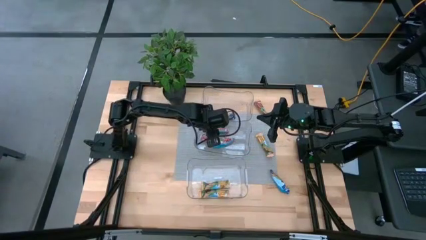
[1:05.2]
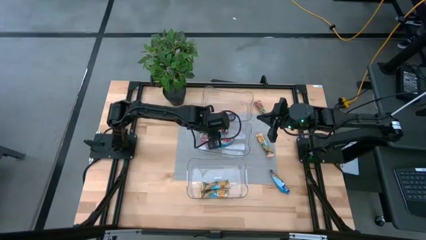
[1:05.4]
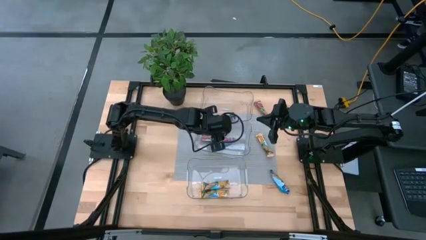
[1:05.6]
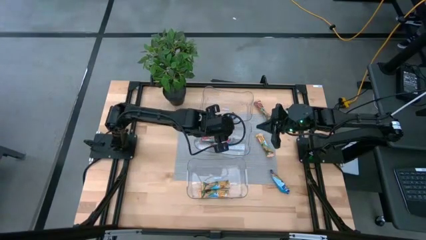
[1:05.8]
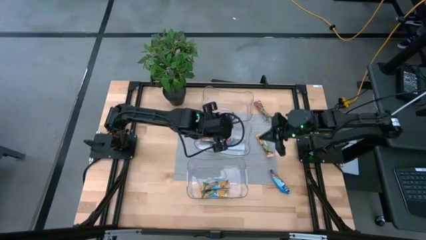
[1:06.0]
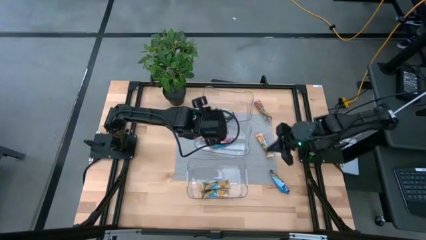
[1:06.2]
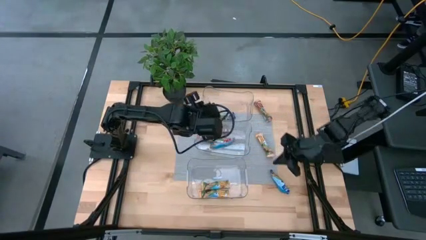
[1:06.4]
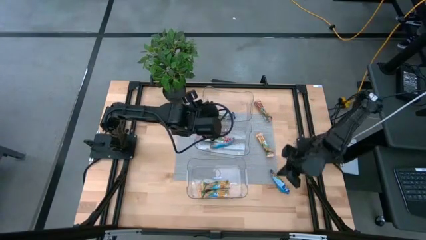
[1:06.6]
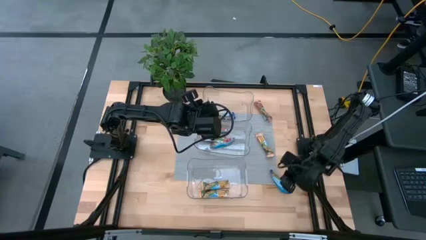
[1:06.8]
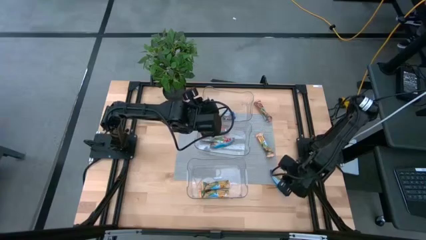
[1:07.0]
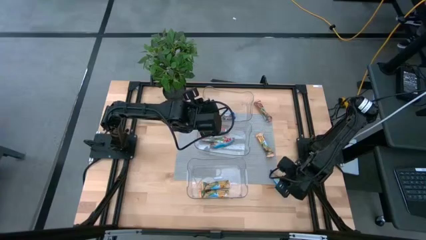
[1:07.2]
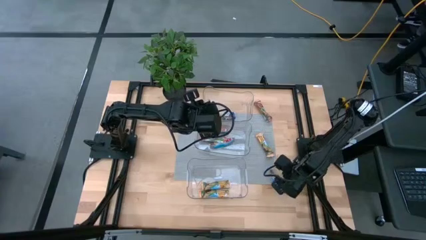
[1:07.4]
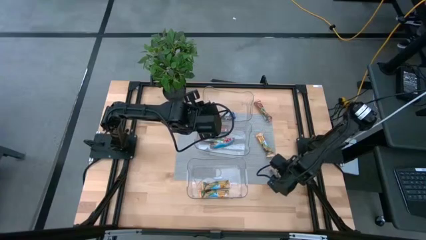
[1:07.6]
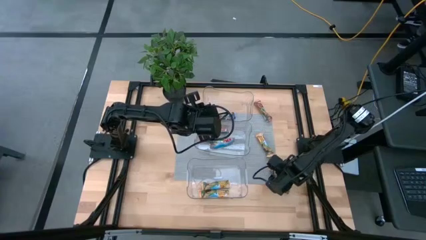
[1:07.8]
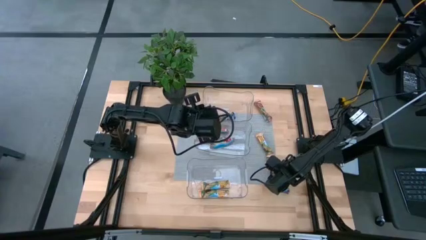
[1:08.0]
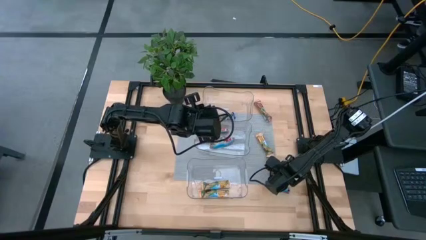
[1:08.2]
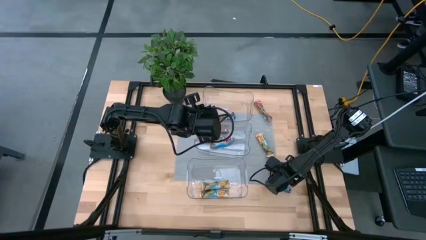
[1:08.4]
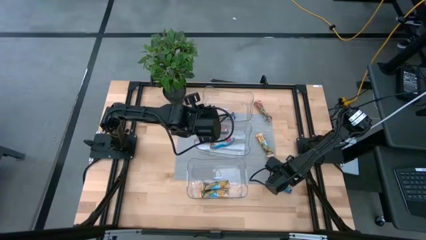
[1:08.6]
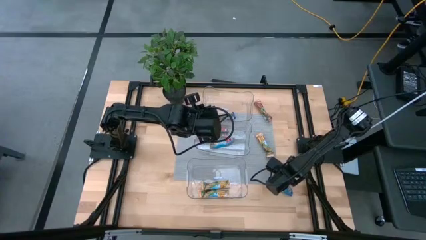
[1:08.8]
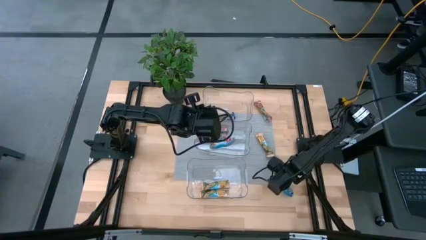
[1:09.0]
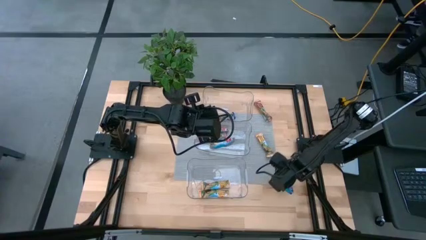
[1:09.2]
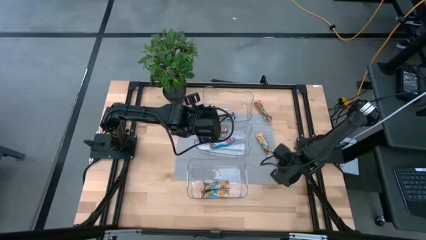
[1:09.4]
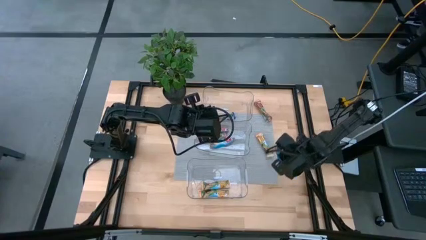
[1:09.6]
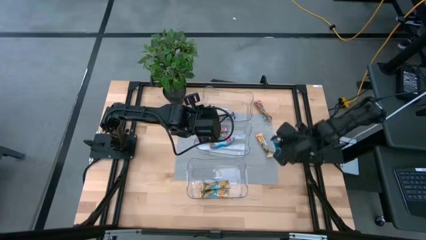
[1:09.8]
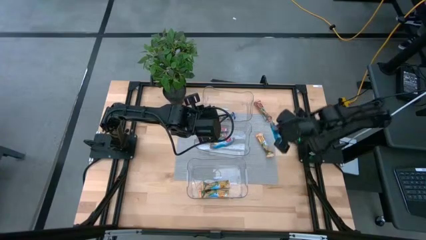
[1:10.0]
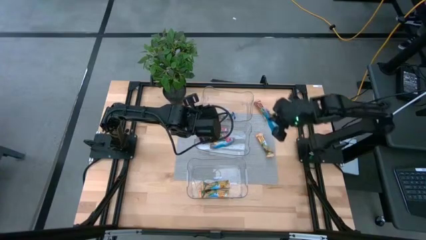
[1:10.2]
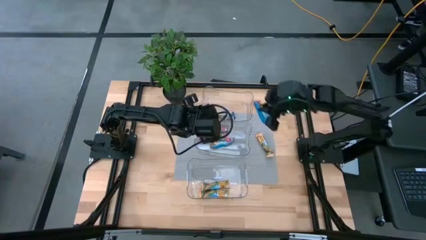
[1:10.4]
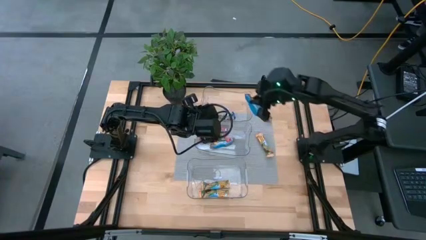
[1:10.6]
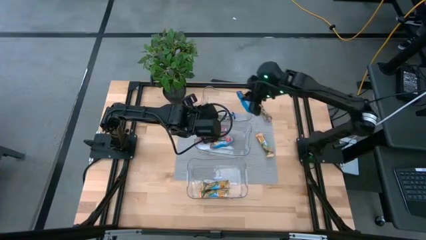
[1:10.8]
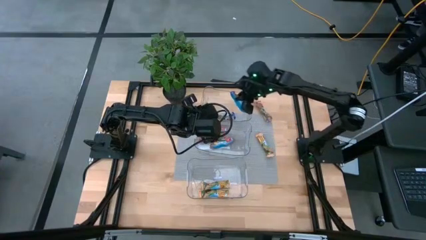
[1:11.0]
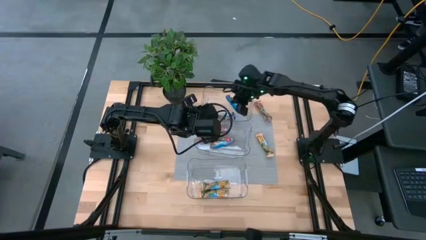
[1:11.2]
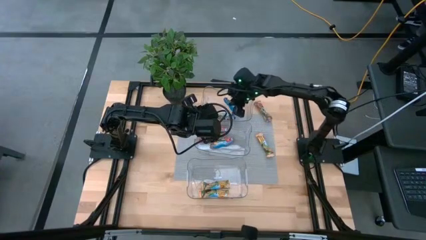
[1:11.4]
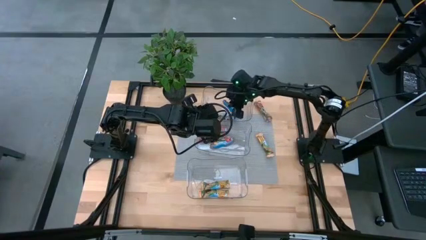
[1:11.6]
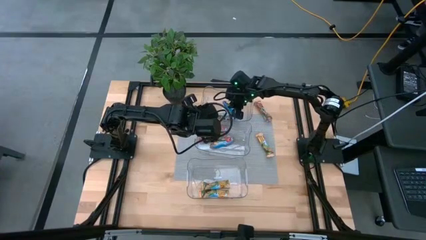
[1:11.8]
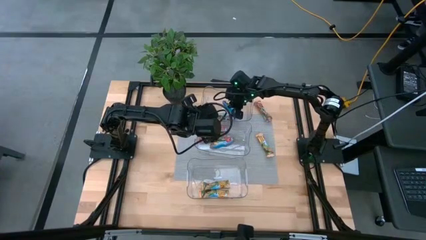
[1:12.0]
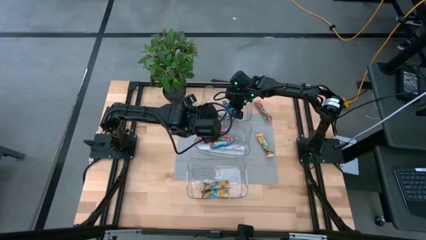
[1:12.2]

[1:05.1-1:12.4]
Task: Pick and place Granola Bars by type
Put the blue granola bar into the top transparent bin

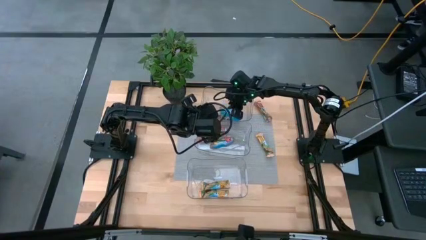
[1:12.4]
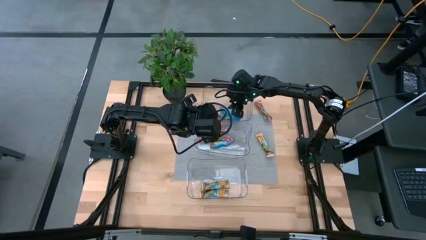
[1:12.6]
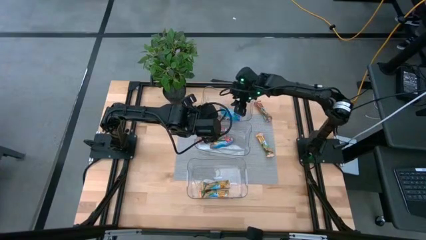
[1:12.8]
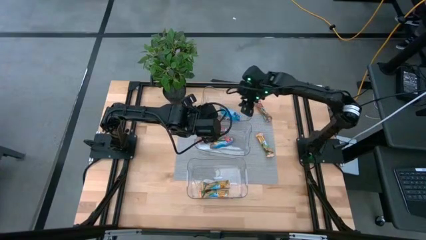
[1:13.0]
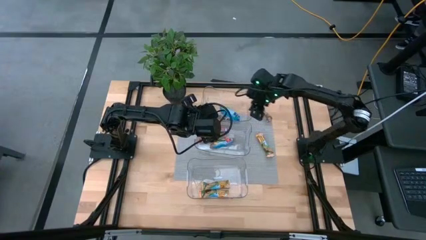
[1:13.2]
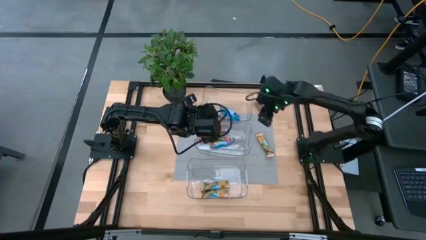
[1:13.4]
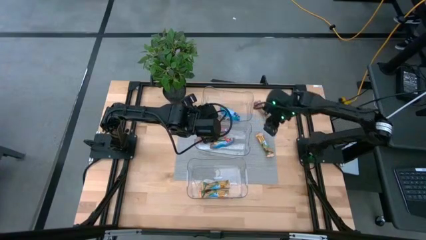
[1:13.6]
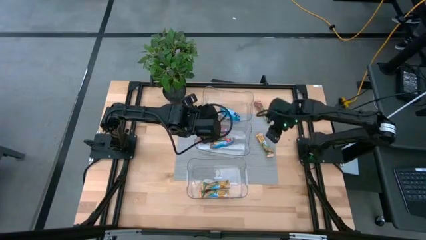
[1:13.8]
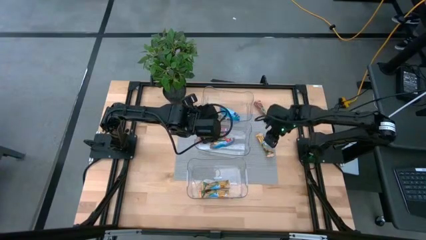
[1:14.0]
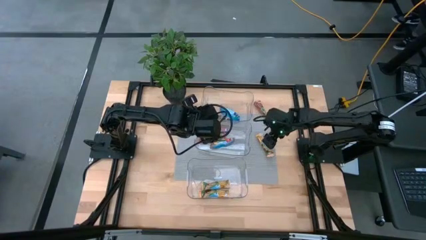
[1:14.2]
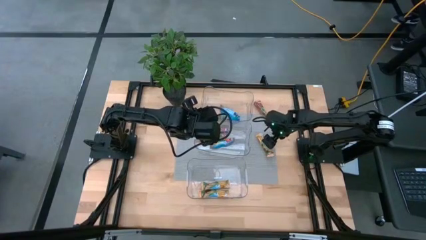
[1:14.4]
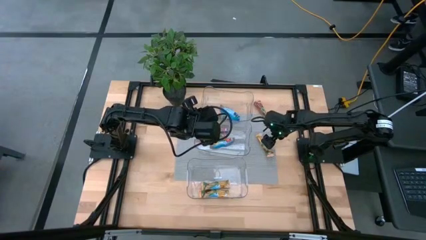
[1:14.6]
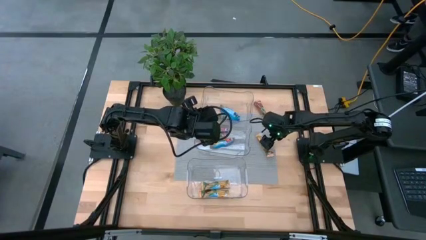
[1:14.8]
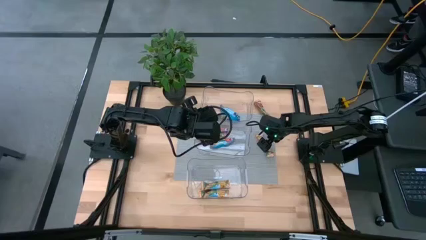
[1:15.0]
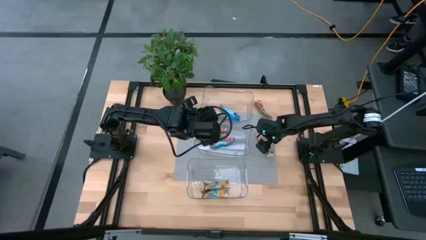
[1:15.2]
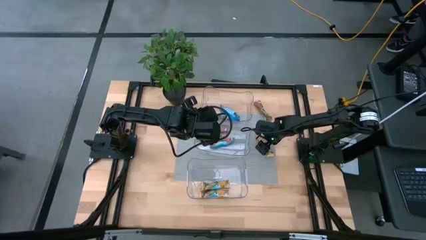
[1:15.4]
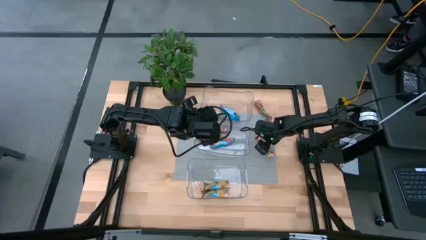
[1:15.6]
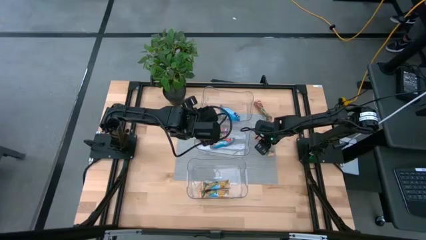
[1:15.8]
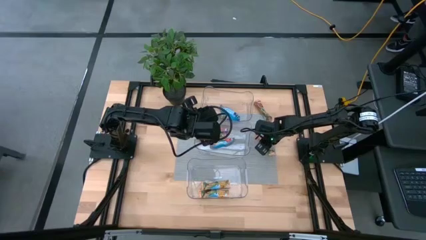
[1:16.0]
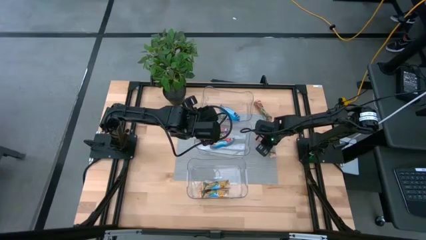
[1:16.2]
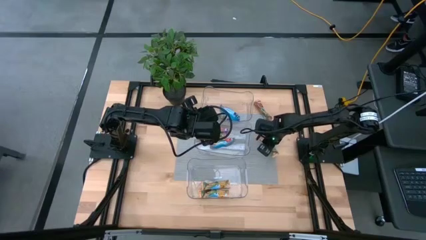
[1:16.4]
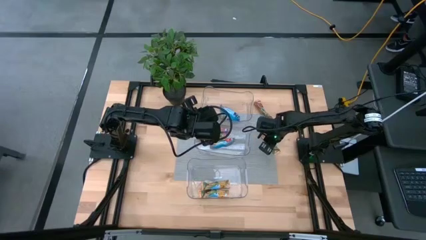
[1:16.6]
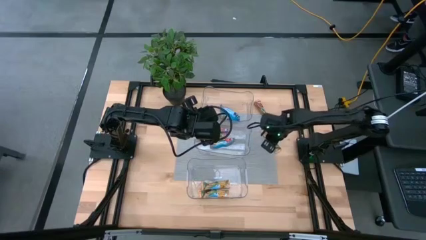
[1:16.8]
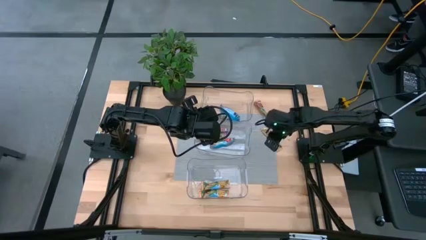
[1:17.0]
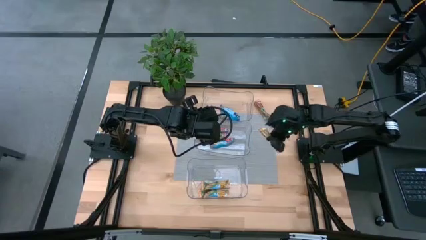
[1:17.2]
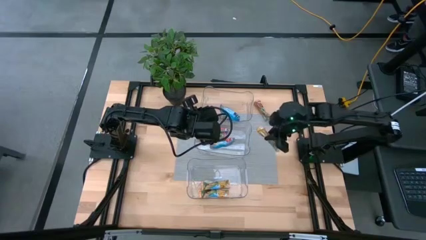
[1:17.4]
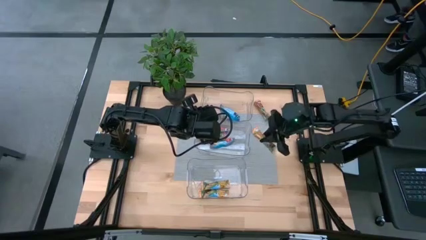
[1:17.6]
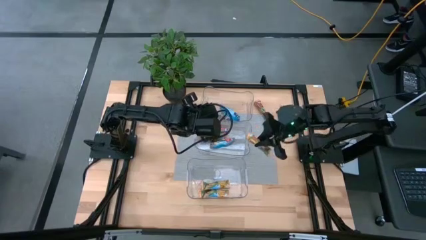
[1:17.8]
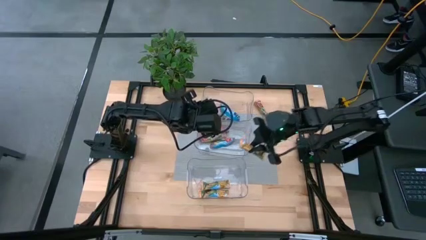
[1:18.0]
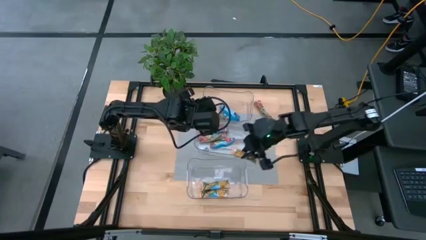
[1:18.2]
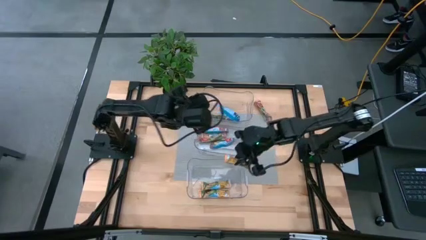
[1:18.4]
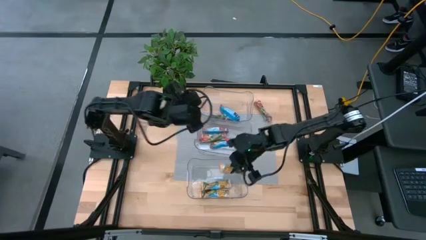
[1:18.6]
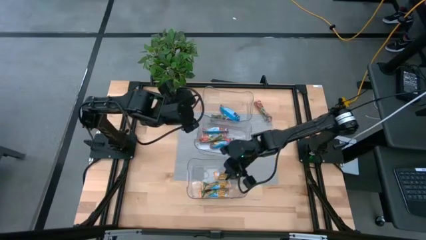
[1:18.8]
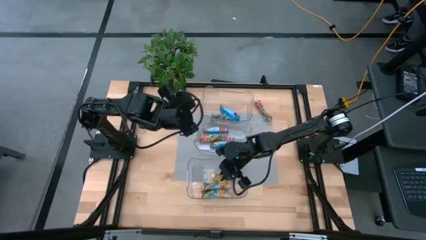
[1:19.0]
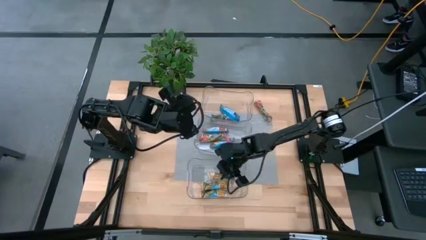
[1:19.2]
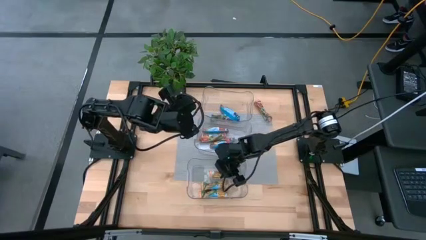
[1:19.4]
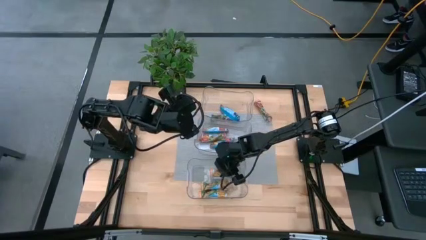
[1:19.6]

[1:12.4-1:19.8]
Put the yellow granola bar into the bottom transparent bin

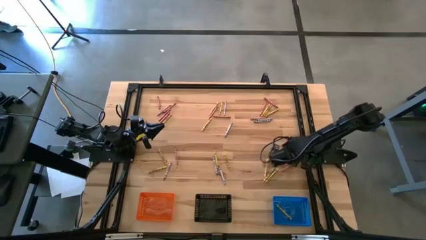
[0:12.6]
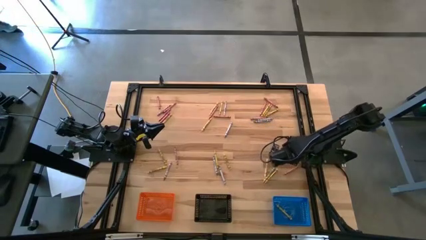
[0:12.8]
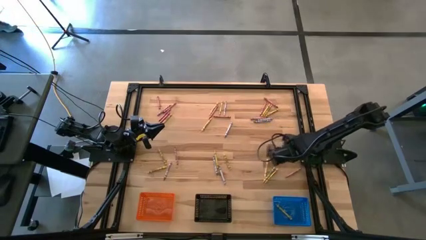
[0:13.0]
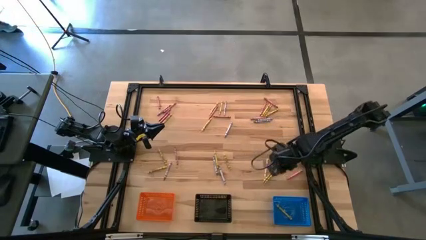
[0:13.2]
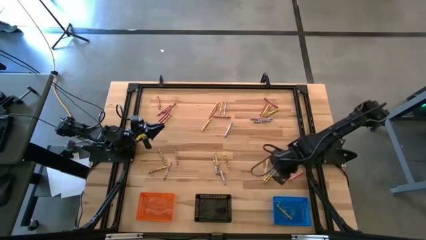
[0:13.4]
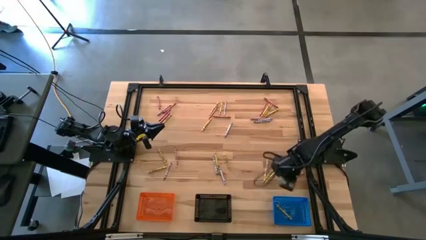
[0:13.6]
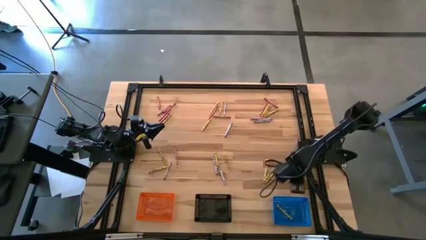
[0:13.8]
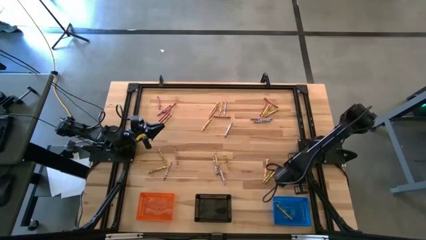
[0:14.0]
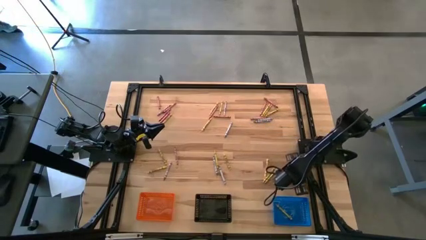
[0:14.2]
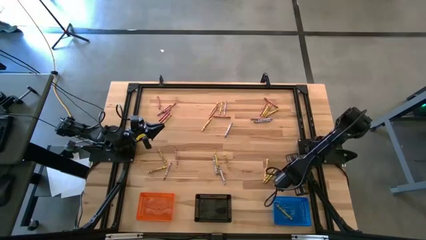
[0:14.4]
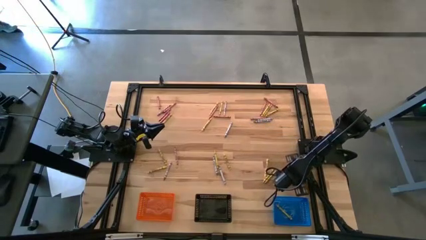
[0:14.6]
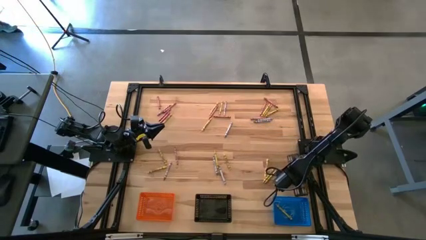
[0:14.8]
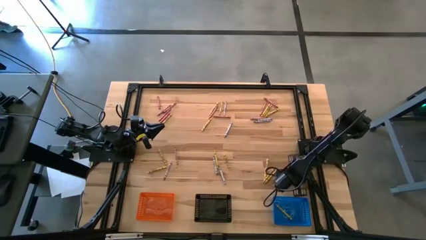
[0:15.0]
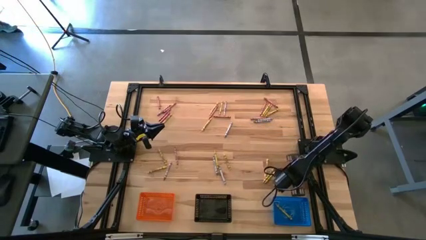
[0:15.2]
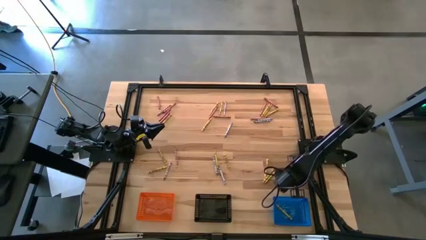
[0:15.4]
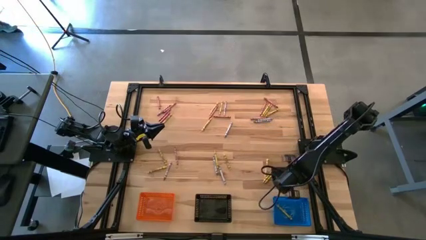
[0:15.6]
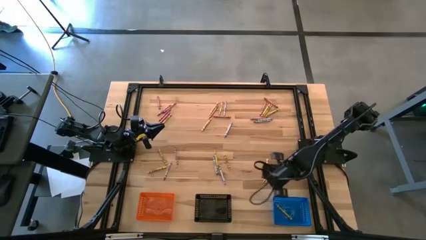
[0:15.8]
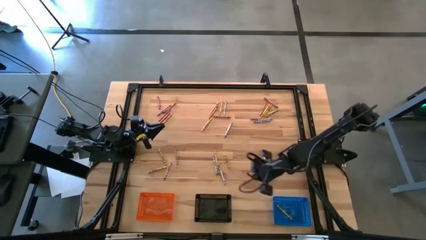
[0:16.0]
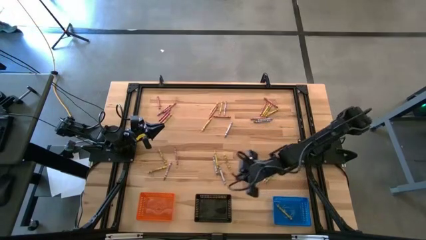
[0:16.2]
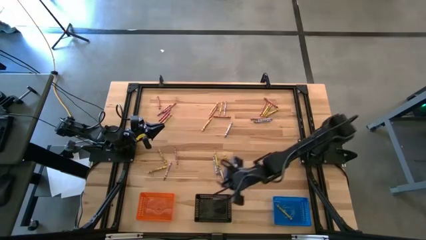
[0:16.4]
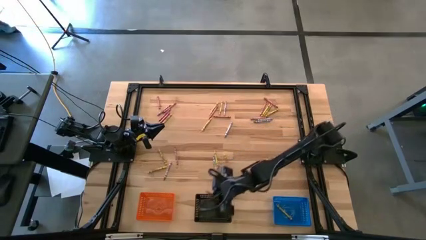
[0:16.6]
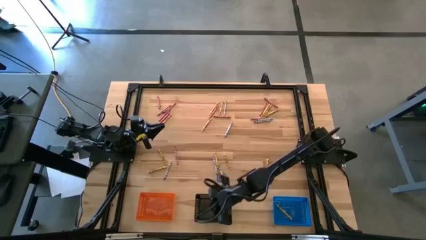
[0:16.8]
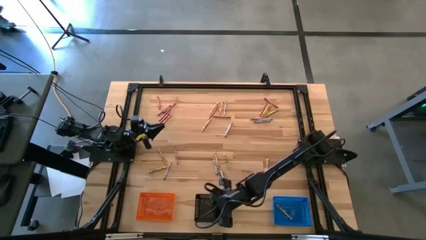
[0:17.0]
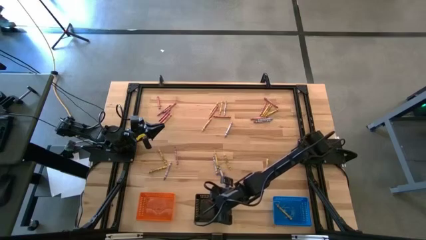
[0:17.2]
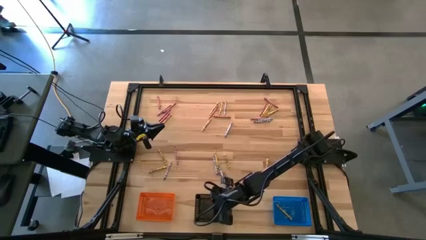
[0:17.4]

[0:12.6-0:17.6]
Task: Sort crayons
Put the red crayon into the black bin
